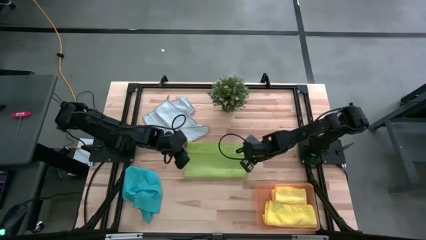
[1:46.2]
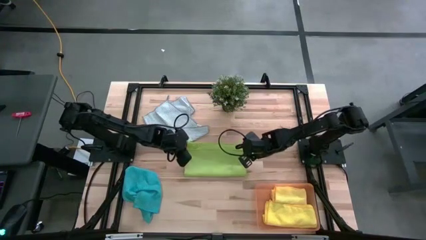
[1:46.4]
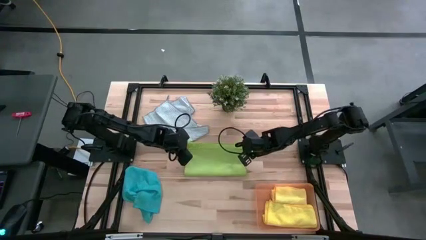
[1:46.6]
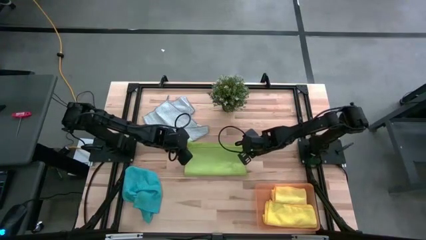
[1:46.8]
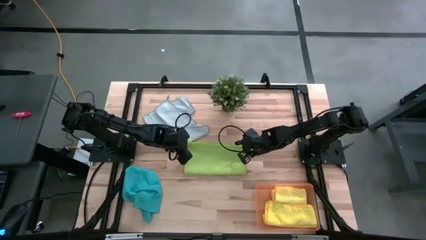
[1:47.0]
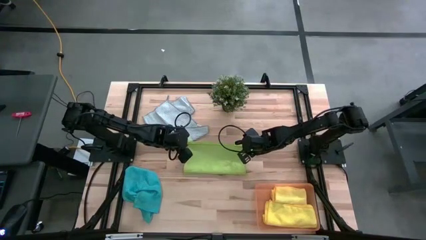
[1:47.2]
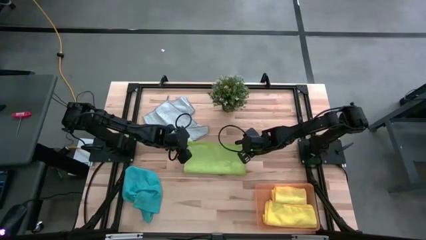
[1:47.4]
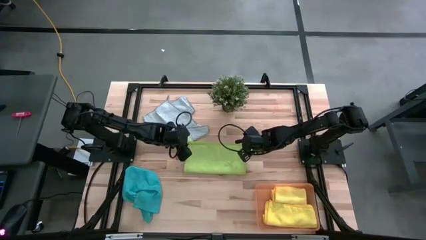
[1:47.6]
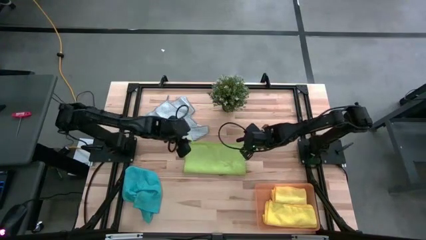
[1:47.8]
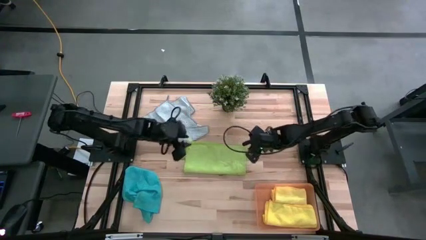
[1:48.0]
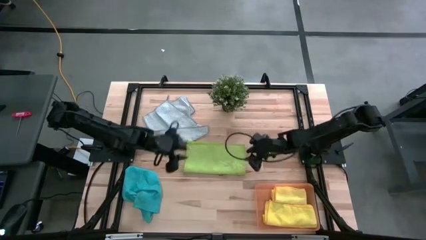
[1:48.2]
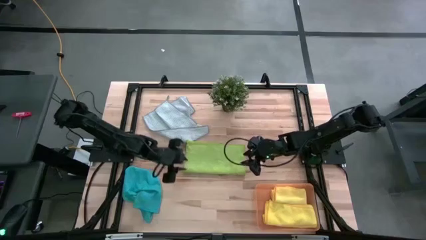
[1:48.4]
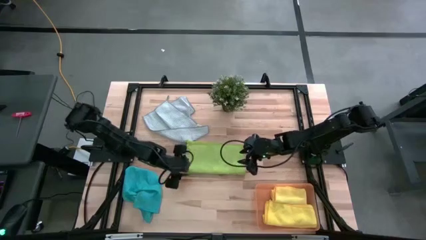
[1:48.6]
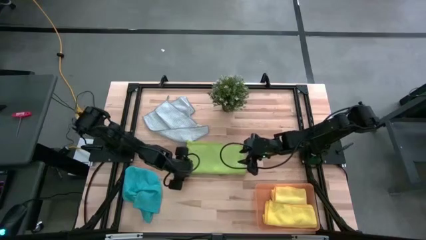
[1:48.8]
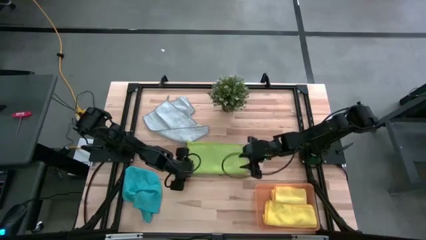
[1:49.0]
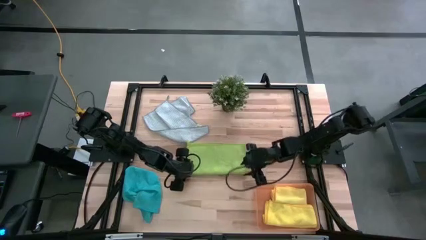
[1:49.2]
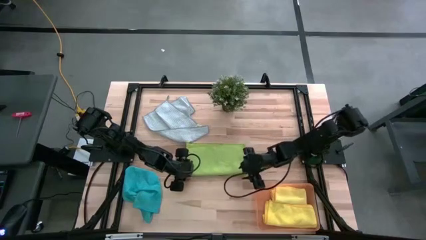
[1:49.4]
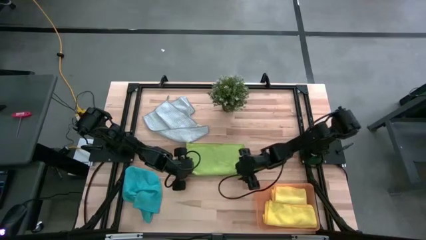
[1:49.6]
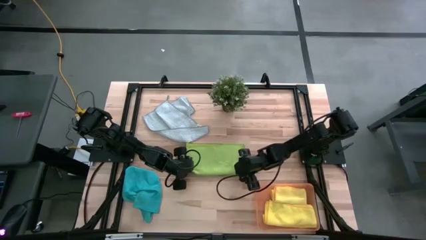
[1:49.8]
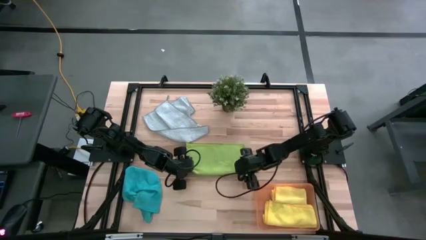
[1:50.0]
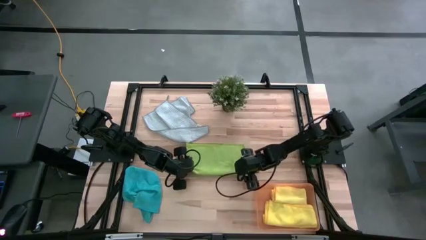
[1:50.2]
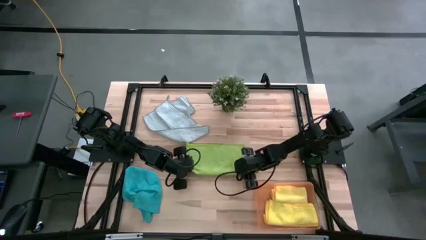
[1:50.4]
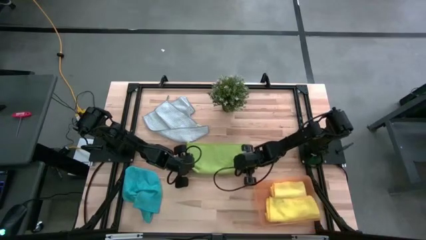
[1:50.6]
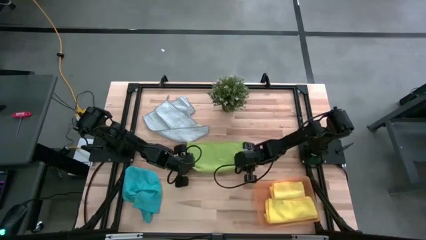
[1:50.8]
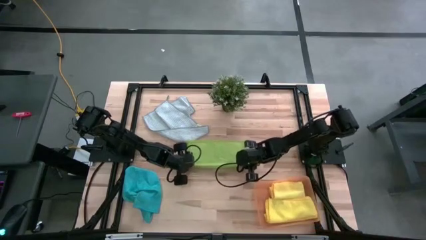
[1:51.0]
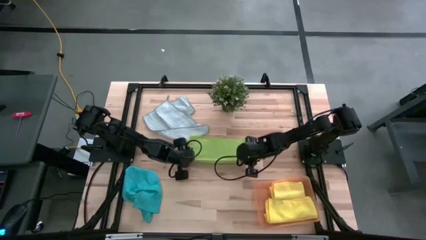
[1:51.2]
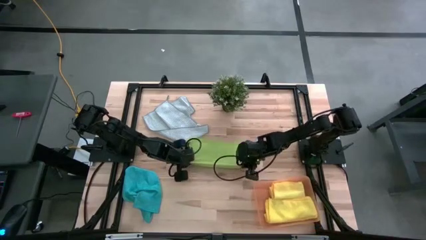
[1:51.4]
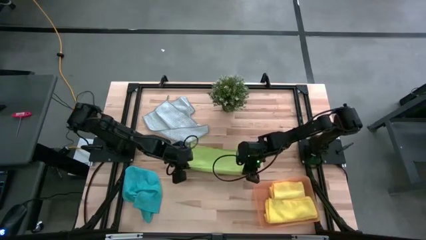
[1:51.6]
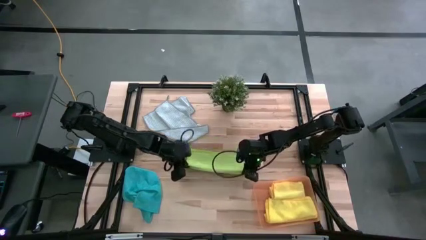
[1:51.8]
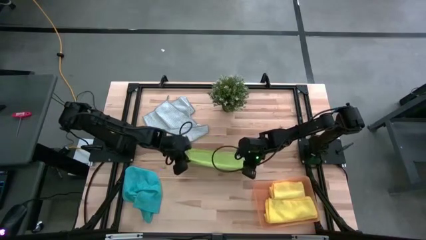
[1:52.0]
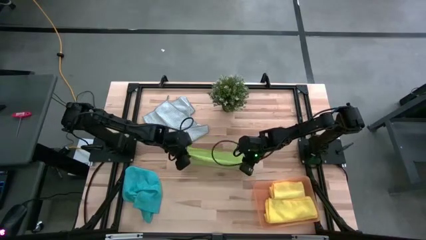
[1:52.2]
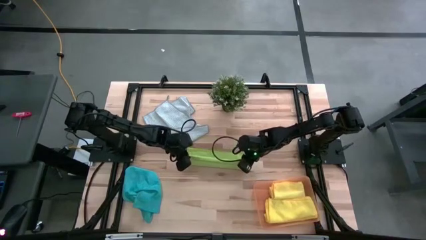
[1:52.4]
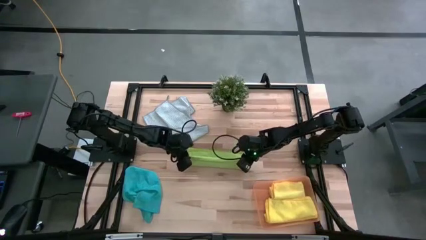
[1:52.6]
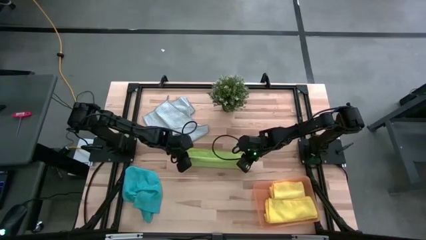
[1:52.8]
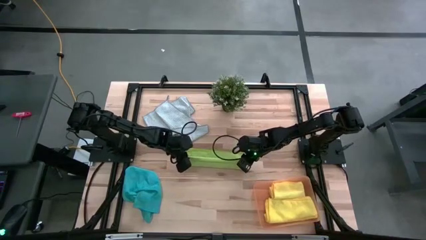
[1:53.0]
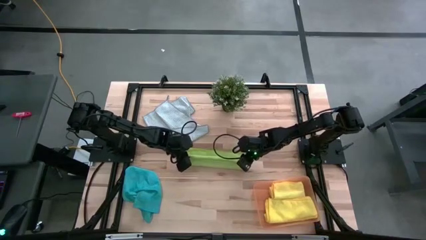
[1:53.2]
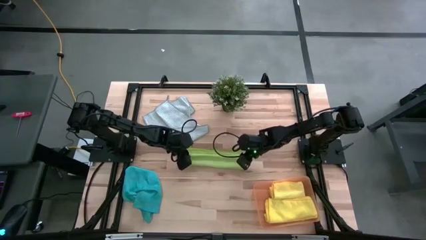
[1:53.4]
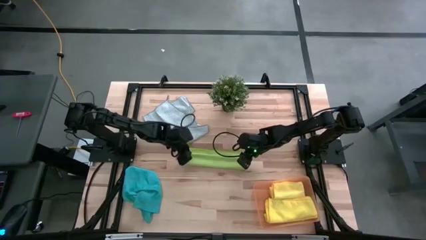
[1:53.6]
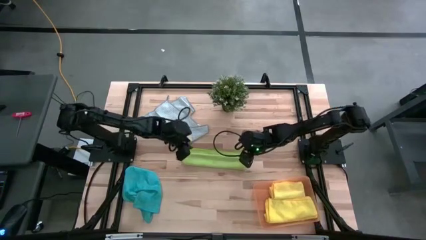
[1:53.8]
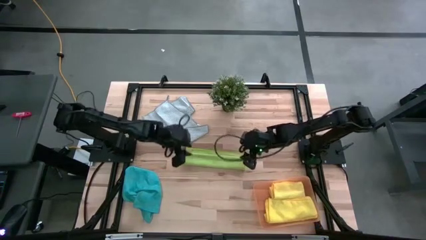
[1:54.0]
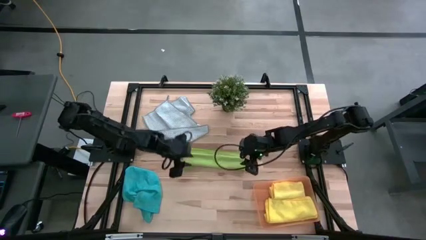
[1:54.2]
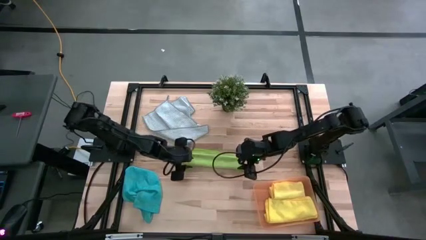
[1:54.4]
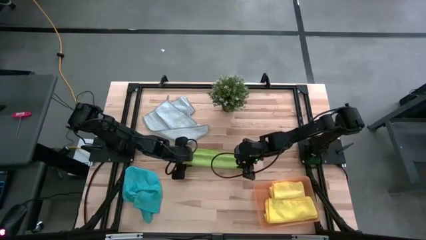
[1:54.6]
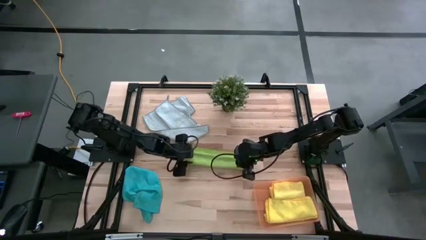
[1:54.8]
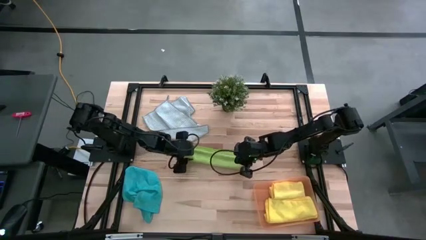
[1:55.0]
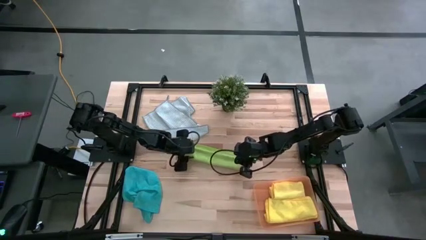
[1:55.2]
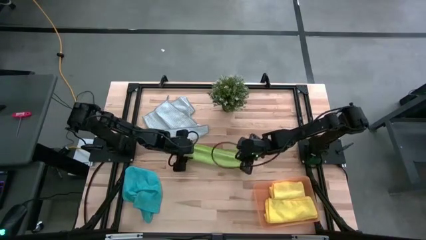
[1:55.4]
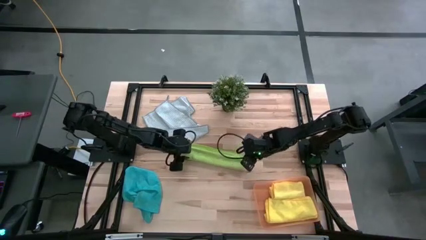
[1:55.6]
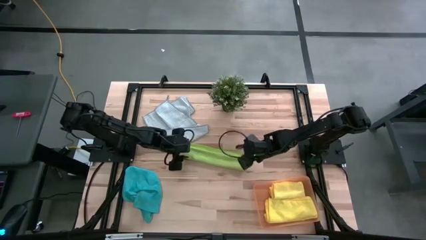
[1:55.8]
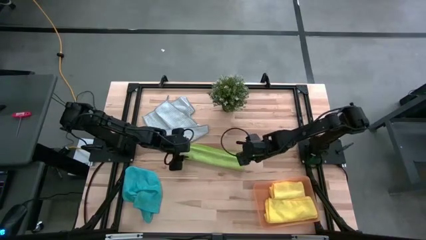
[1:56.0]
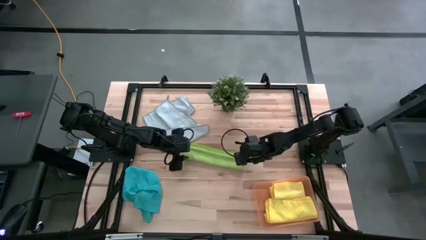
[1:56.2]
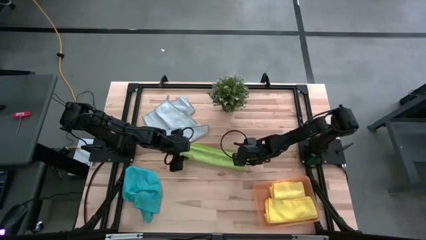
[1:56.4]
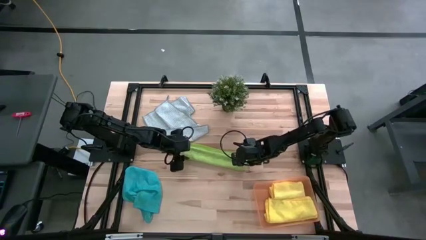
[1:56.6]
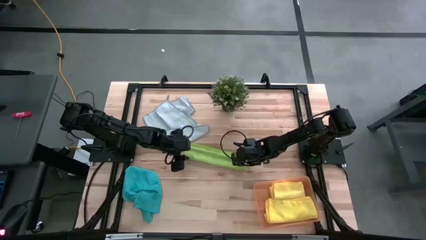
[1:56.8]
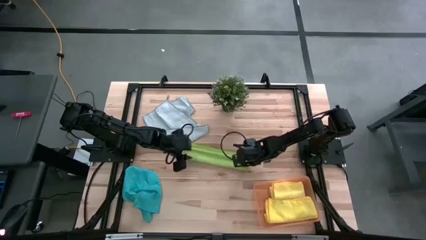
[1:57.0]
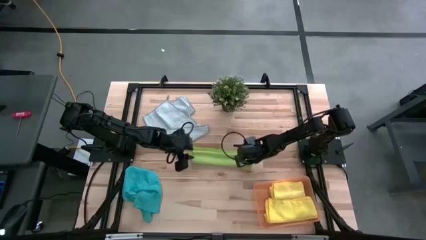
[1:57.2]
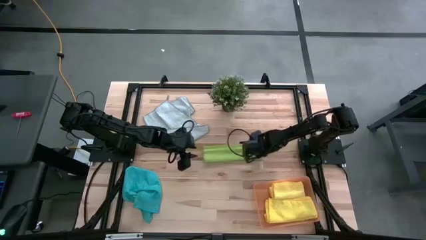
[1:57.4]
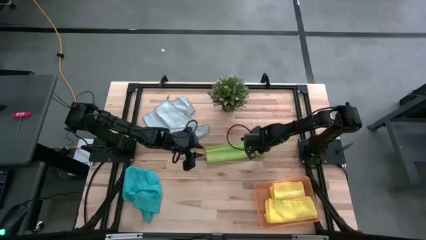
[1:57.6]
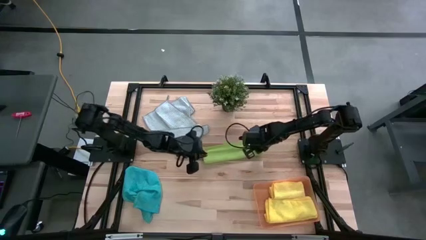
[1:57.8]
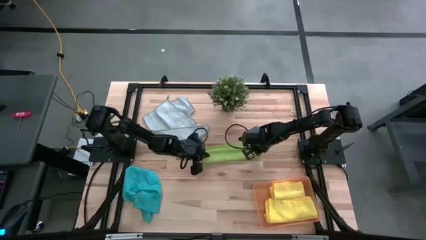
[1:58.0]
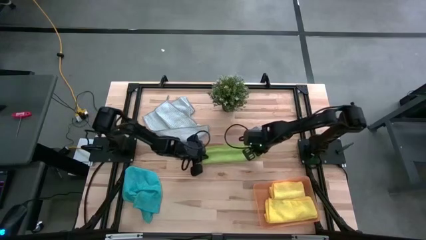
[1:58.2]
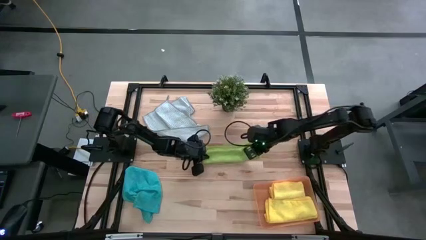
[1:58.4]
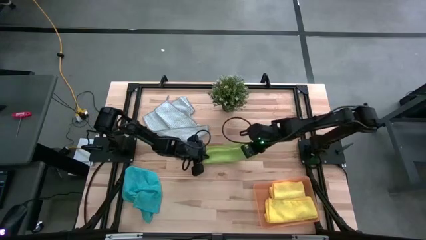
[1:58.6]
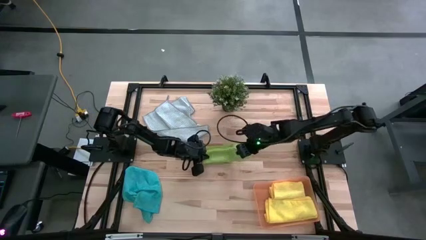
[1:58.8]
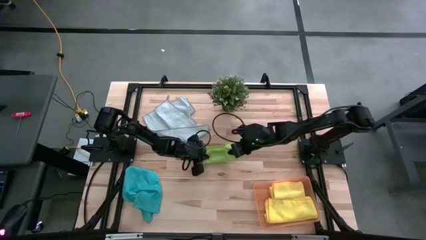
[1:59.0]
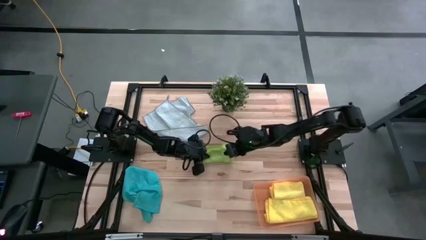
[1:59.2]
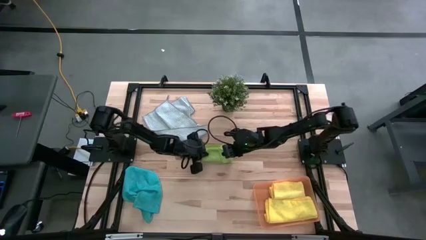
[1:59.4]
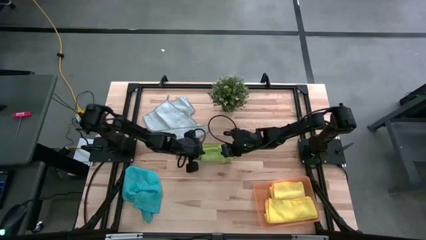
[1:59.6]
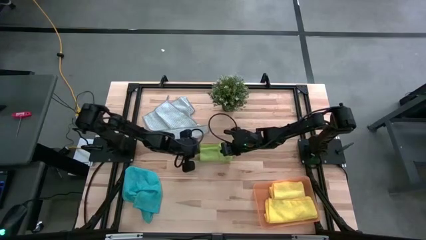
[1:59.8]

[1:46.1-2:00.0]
Task: Fold microfiber towels
Fold the green microfiber towel

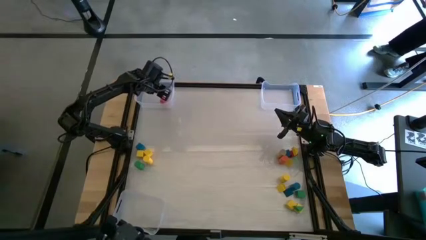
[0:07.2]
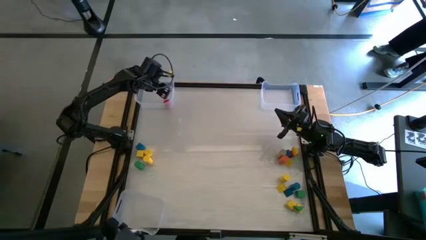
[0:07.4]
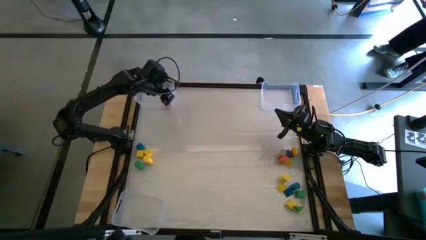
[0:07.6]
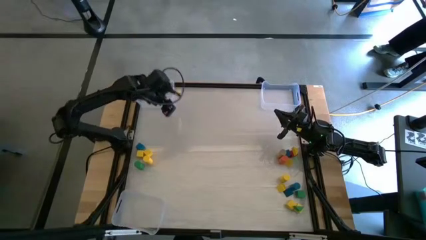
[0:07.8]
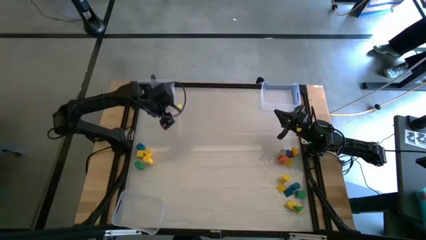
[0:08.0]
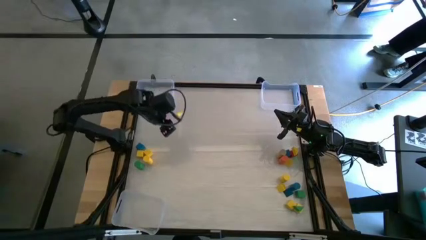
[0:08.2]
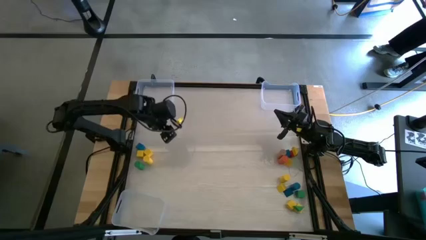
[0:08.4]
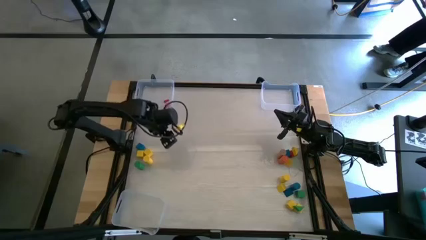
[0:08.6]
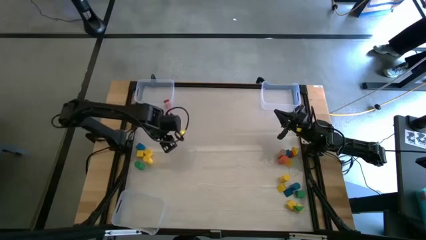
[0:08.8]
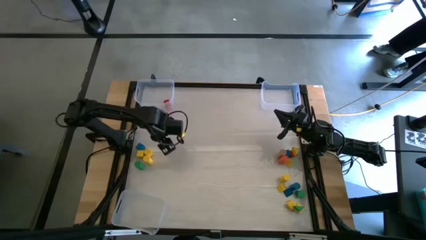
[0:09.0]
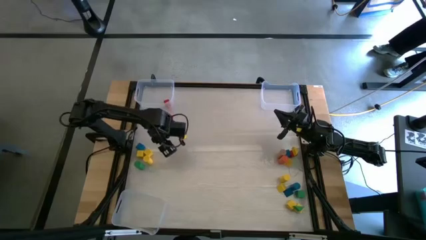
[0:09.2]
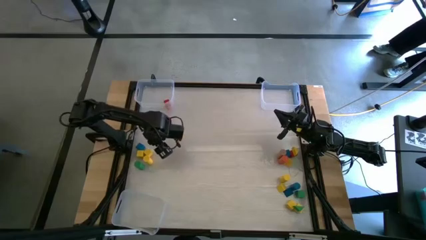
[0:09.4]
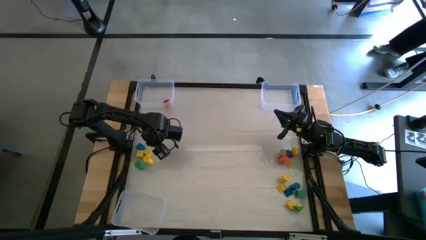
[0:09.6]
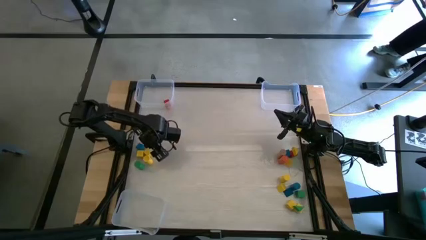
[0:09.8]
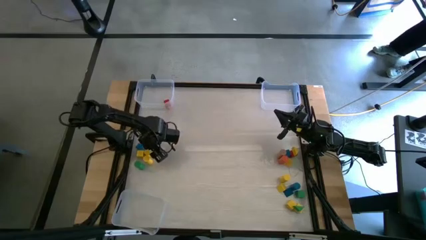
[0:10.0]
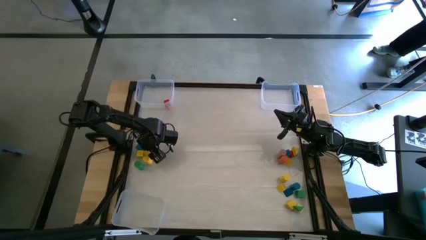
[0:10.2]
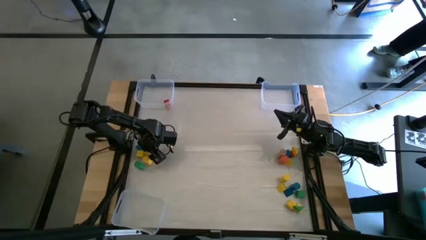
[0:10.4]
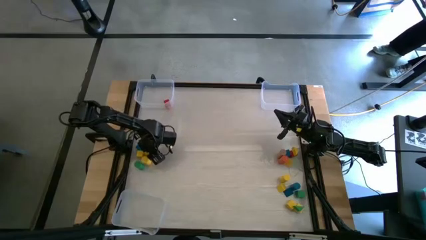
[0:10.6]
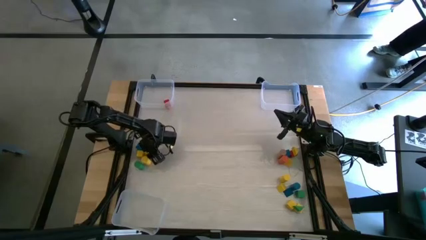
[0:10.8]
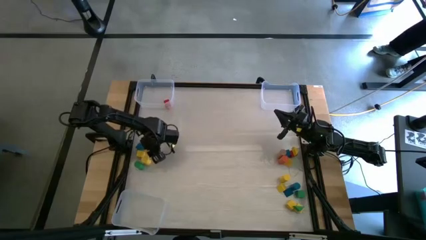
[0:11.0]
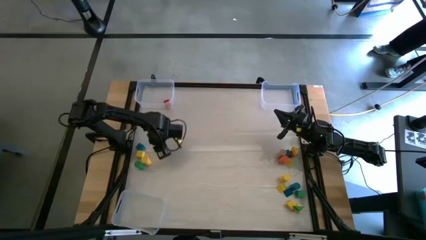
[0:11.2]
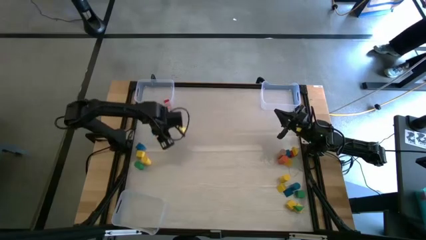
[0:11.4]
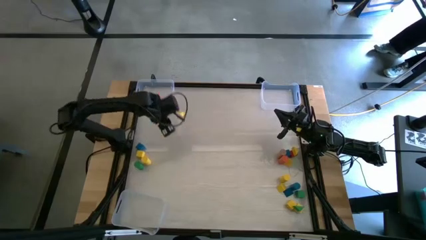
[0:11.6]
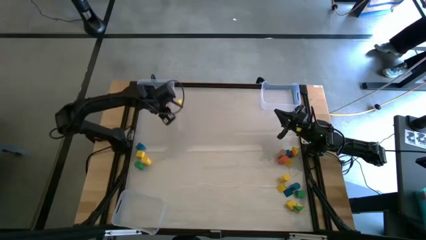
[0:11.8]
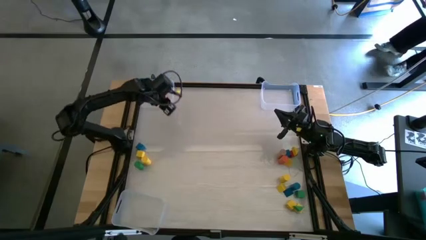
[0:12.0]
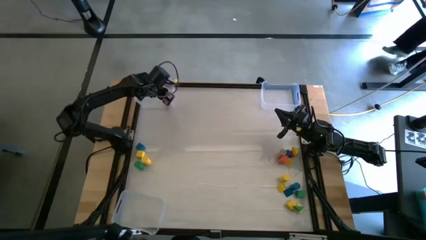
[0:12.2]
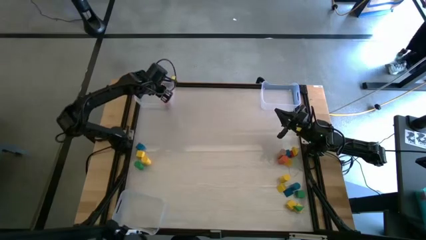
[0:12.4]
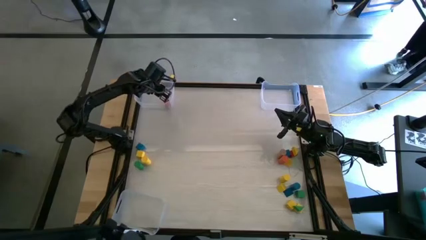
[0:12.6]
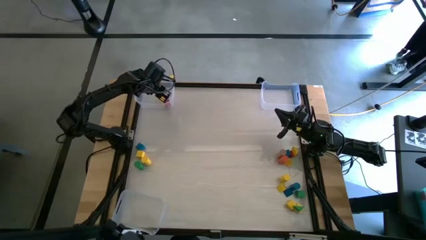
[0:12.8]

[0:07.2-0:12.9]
Task: Sort blocks by size
Put the top right yellow cube block into the top left transparent bin
